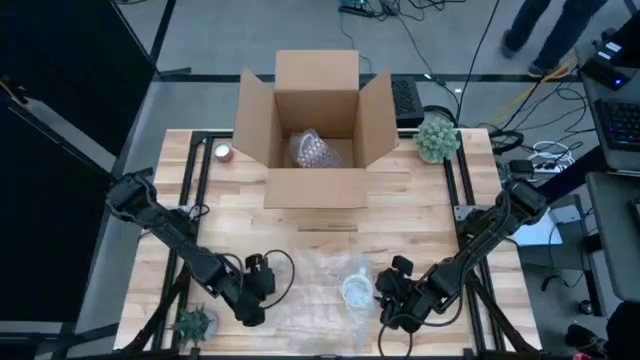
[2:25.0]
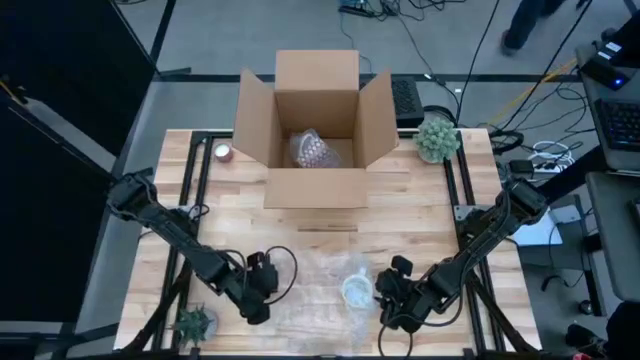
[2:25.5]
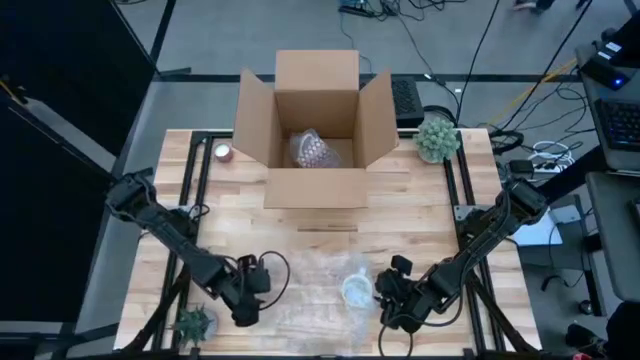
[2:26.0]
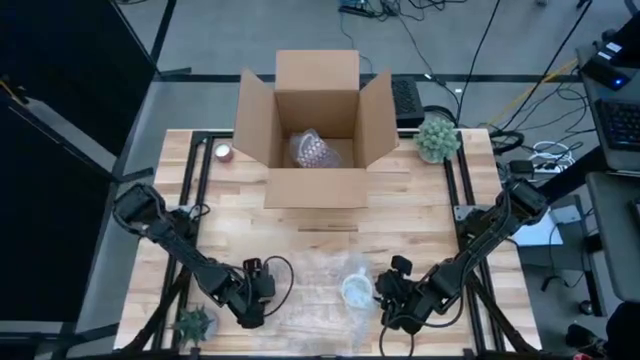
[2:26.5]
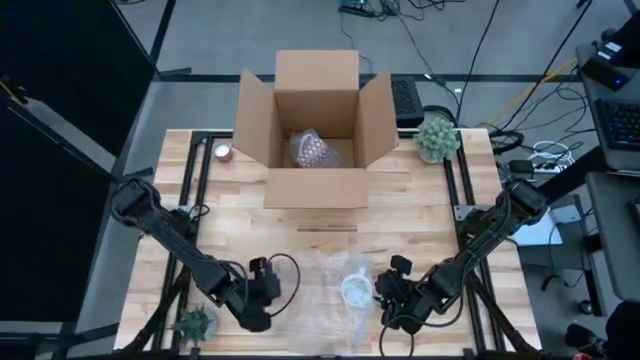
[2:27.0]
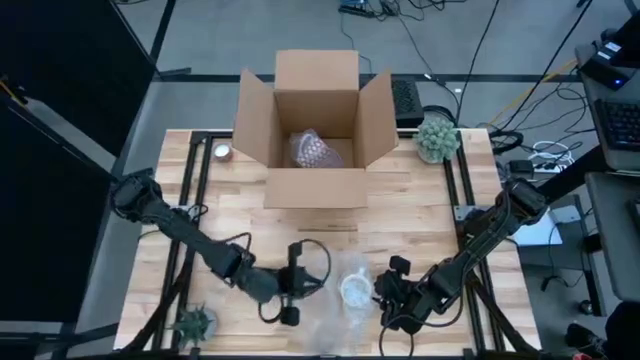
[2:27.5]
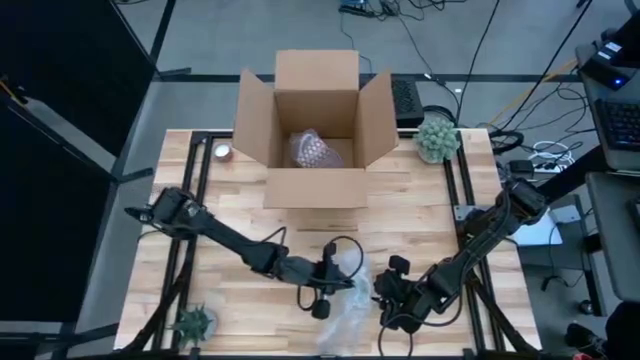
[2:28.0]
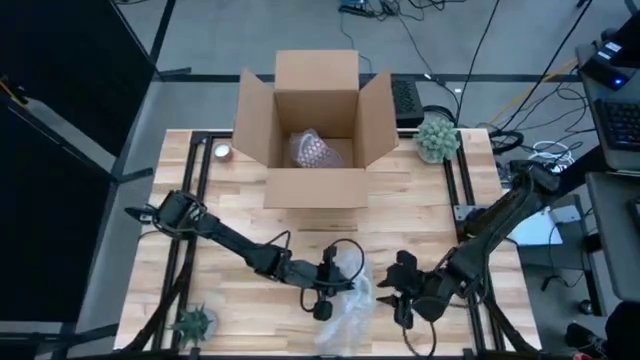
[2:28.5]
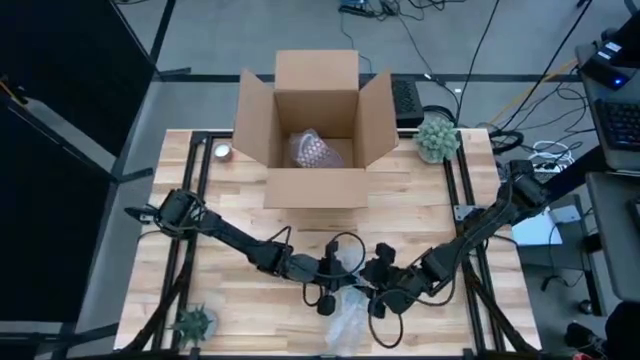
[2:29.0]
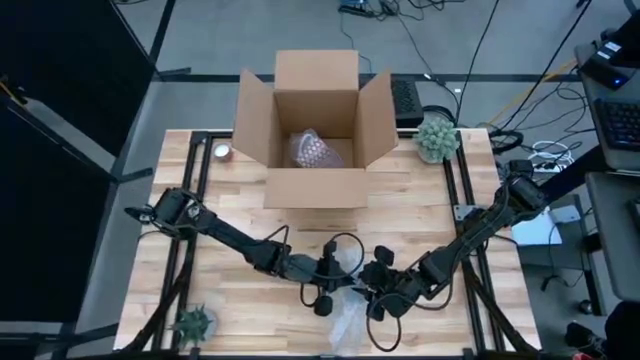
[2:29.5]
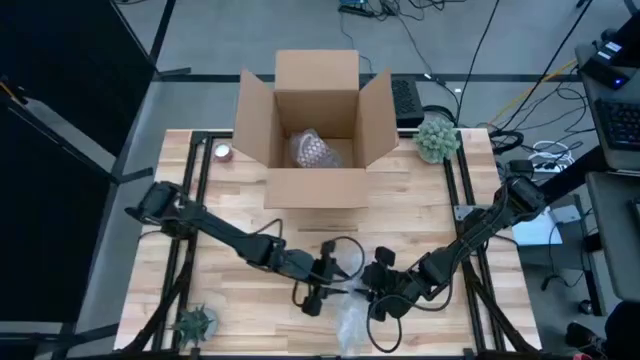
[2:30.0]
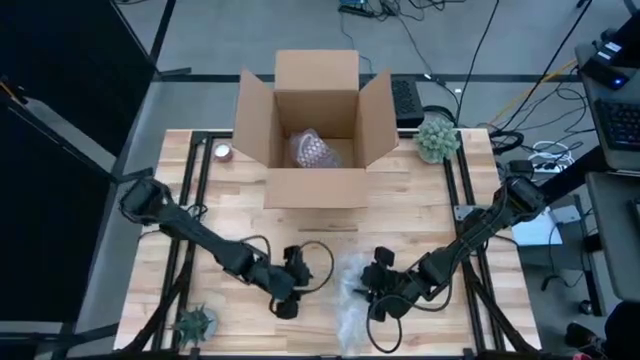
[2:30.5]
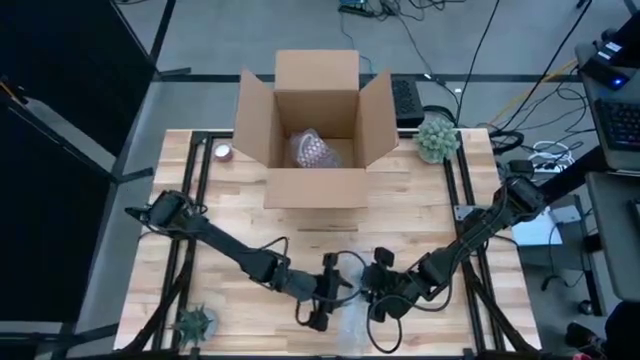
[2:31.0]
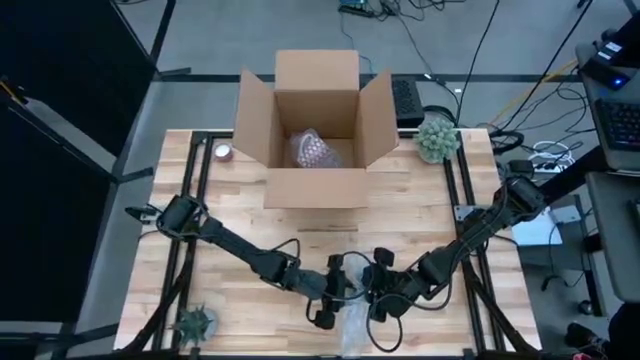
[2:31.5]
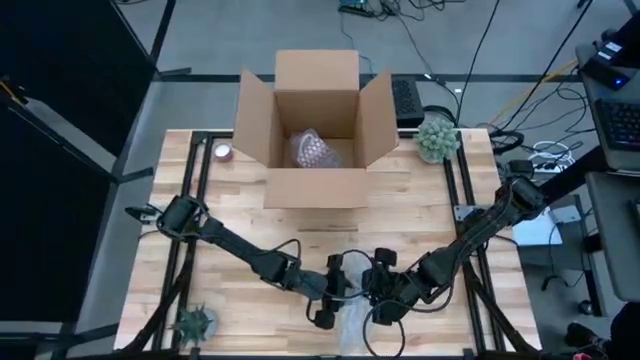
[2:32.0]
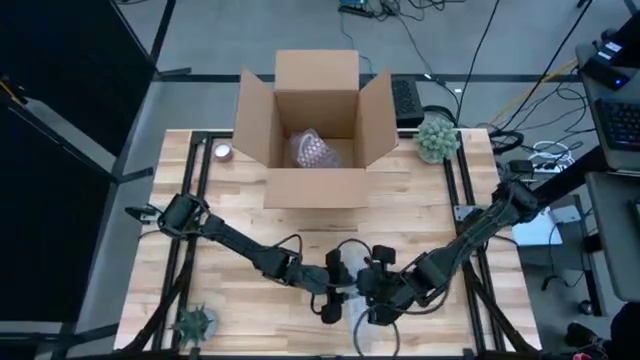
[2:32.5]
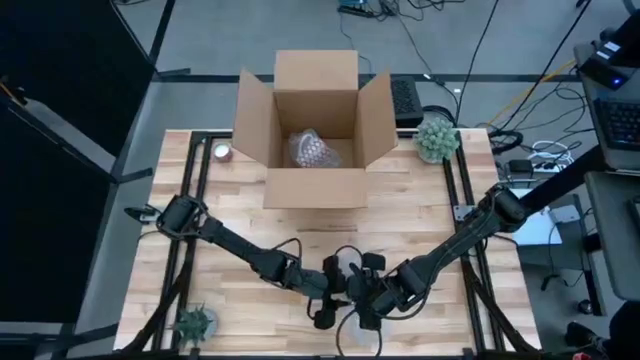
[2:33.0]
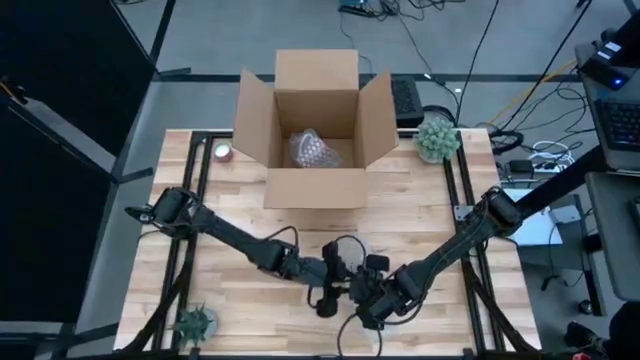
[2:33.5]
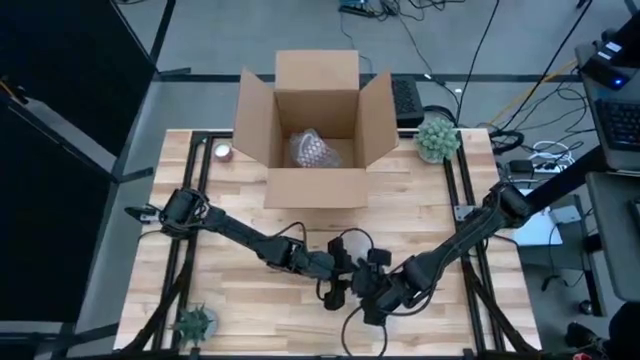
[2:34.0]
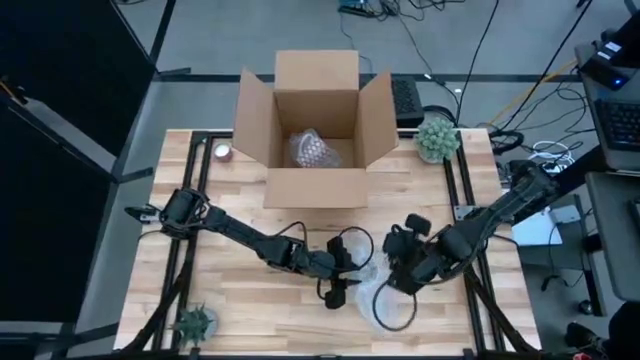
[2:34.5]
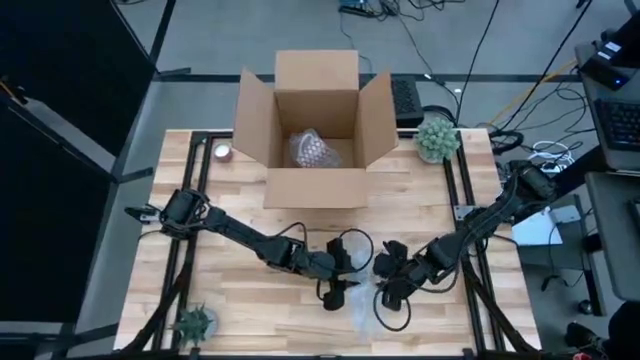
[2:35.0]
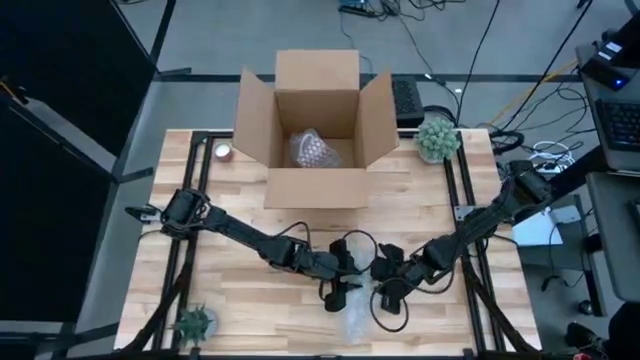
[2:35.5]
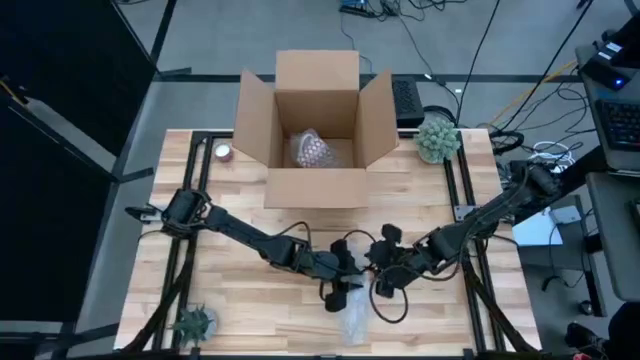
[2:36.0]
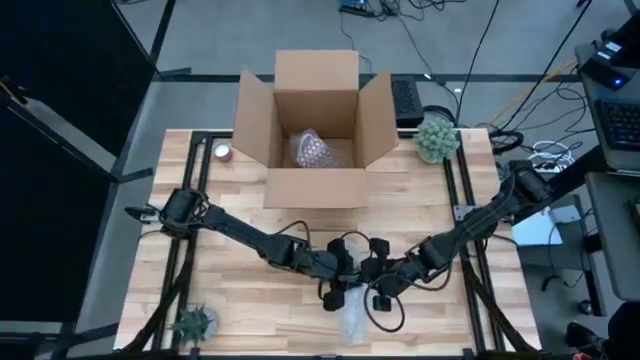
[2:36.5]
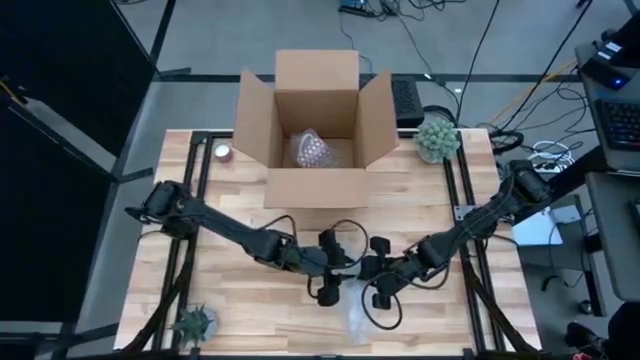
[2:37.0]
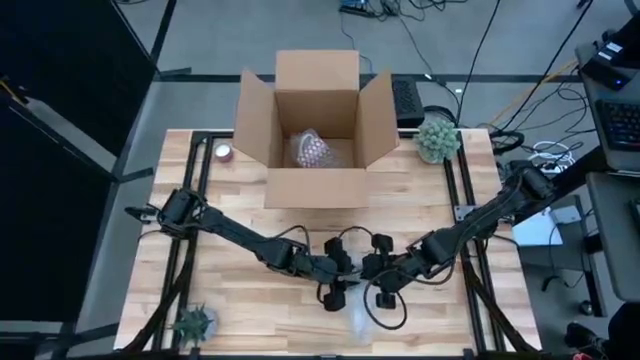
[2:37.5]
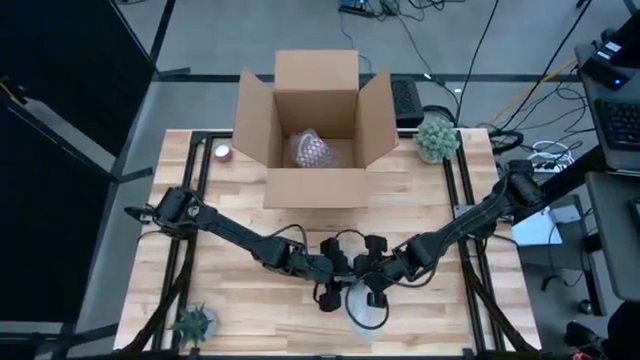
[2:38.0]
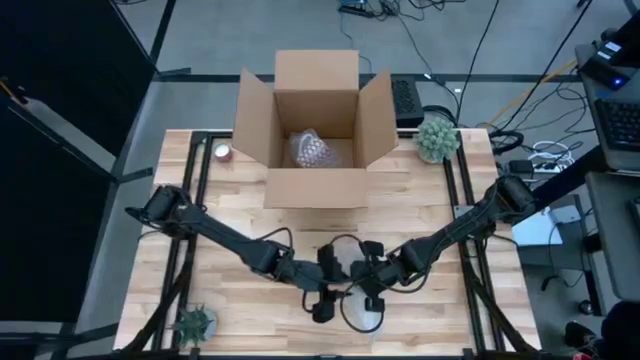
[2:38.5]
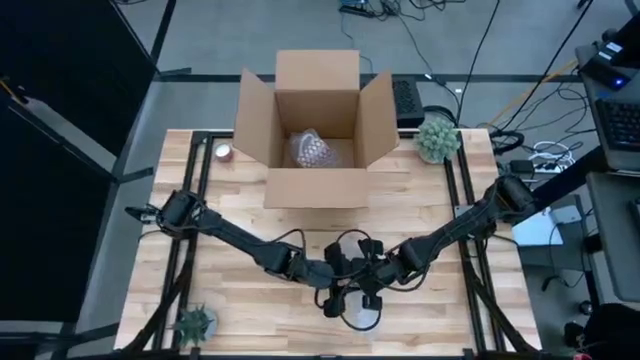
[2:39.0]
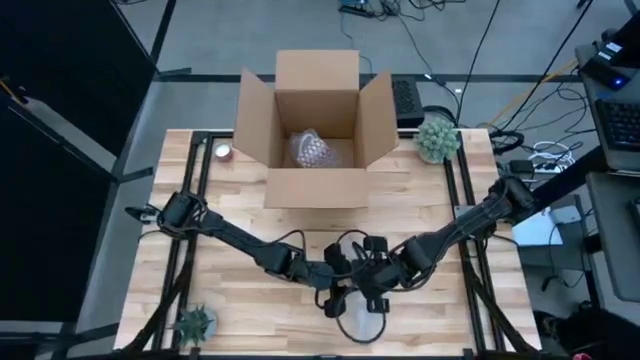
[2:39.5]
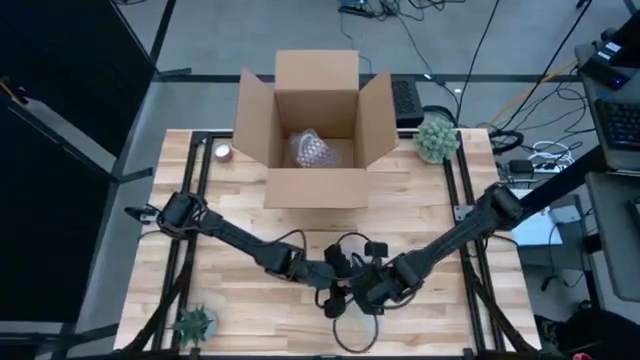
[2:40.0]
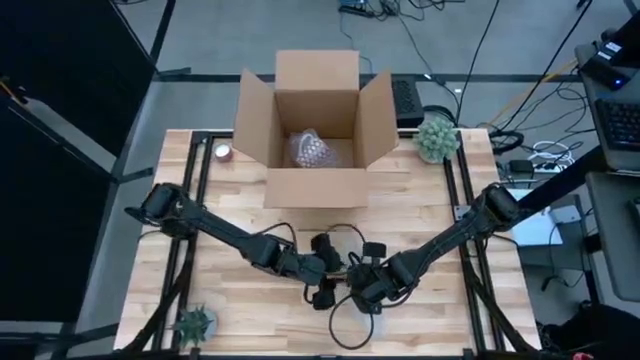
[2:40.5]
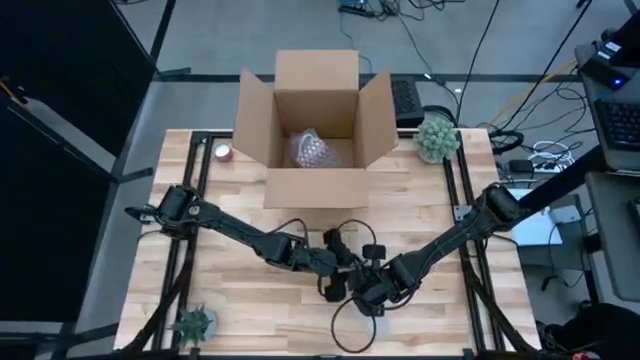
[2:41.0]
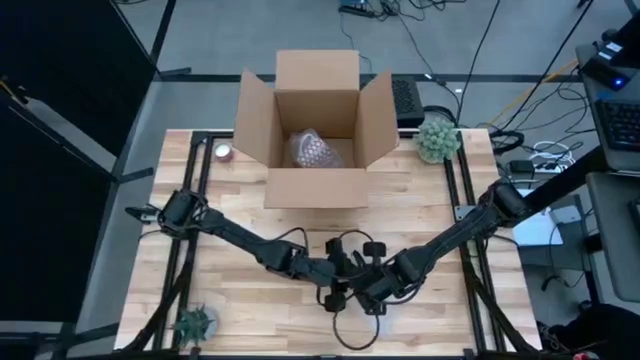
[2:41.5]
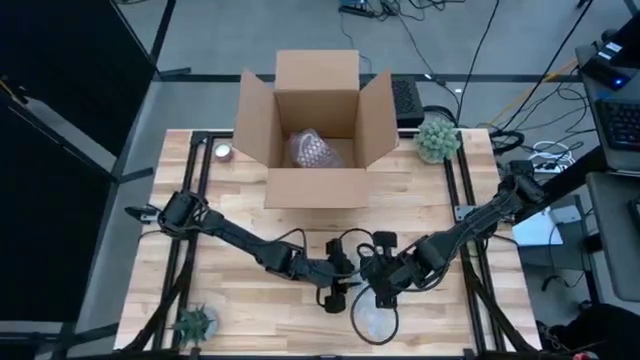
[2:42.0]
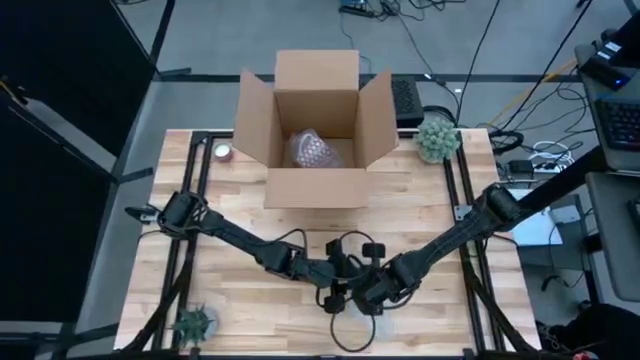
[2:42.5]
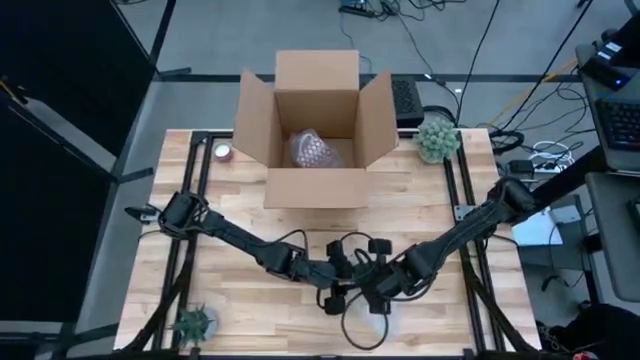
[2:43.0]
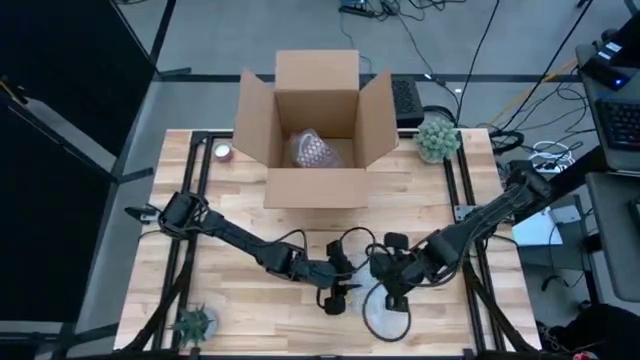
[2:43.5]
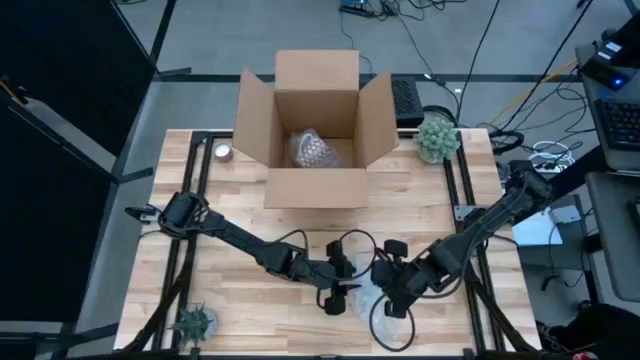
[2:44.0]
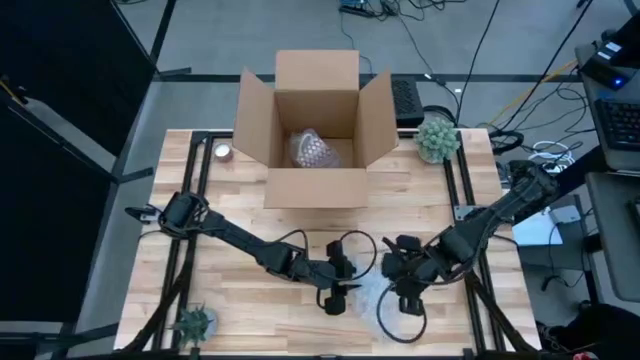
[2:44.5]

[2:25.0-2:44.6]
Task: wrap mug
Wrap the yellow mug with the bubble wrap

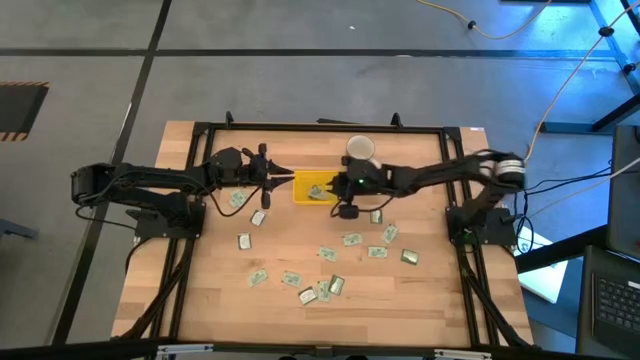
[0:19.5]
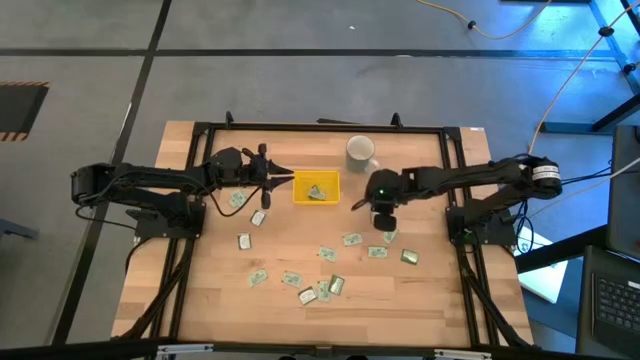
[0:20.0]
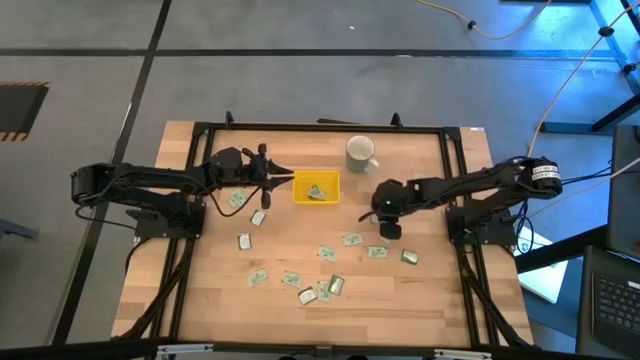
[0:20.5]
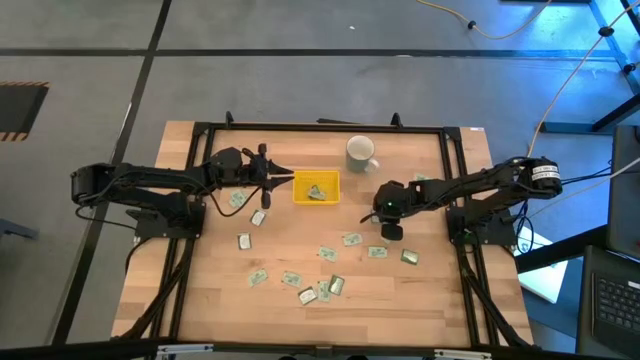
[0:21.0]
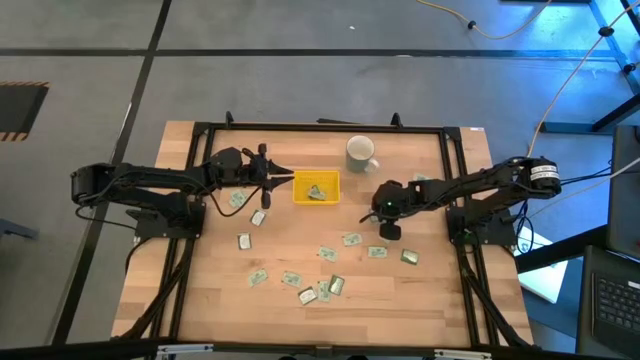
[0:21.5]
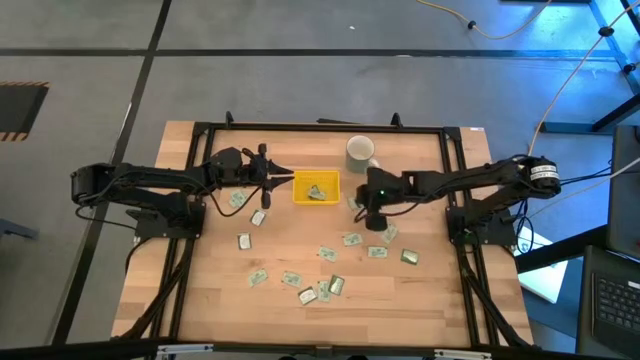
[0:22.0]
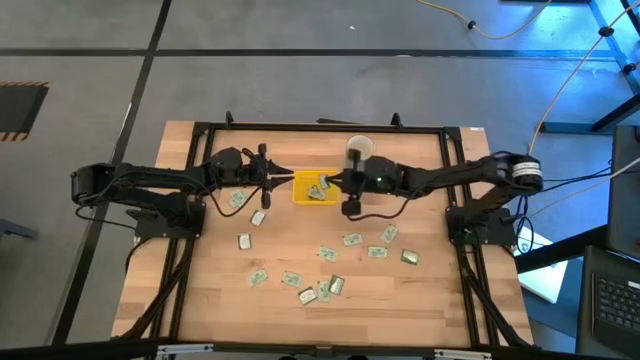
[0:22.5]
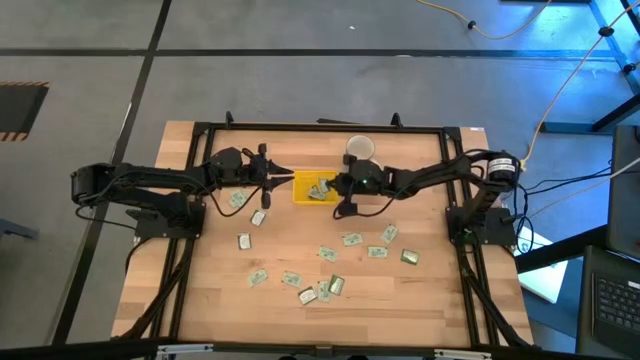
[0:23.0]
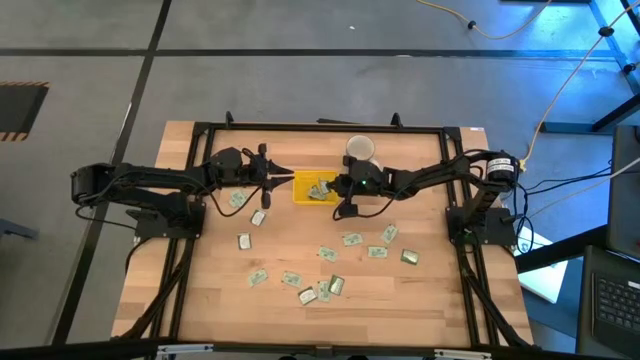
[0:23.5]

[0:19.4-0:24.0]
Task: Pick and place Stevia / Truvia into bins
Put the middle right truvia tea packet into the yellow bin
